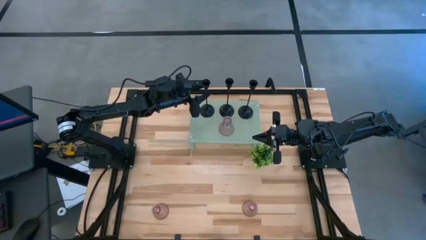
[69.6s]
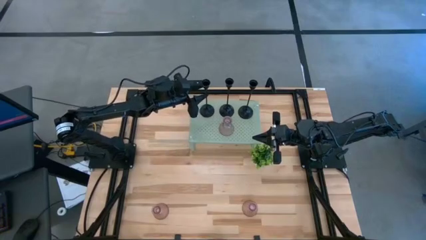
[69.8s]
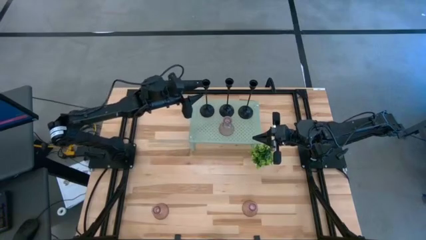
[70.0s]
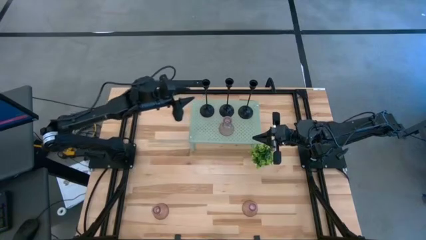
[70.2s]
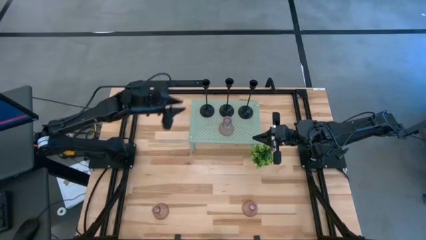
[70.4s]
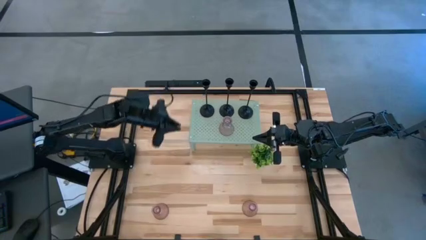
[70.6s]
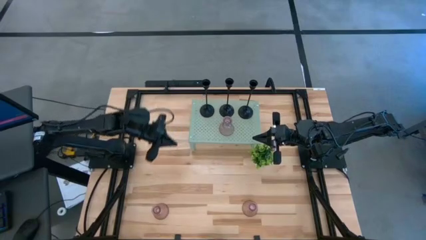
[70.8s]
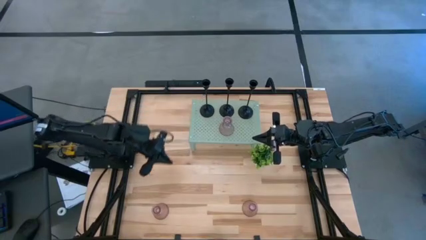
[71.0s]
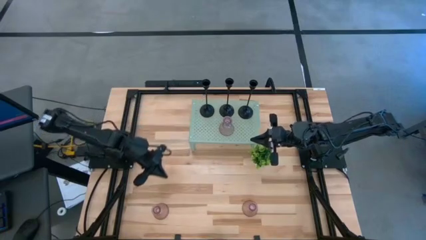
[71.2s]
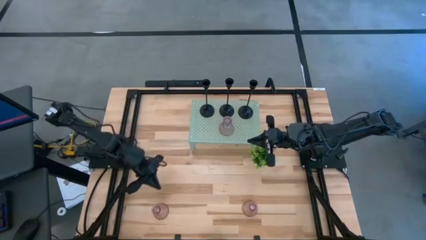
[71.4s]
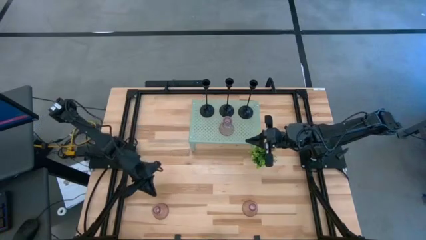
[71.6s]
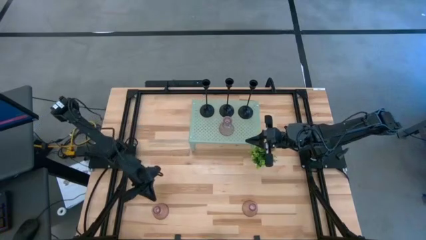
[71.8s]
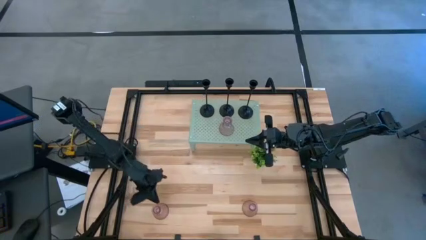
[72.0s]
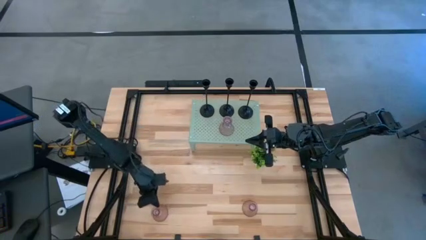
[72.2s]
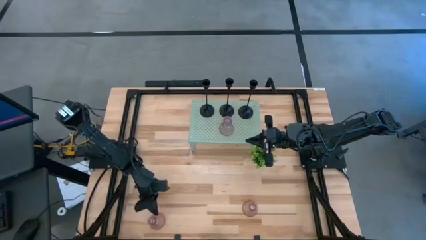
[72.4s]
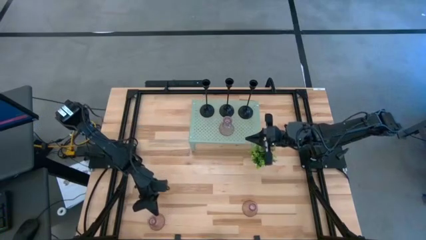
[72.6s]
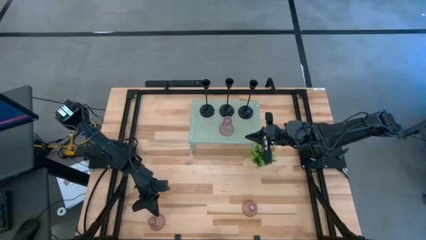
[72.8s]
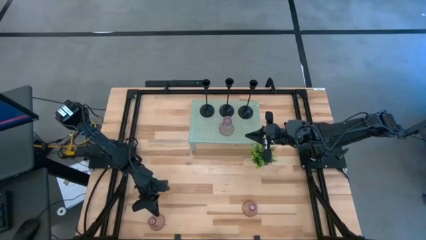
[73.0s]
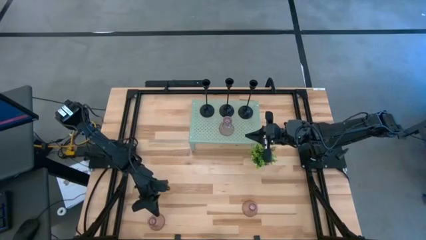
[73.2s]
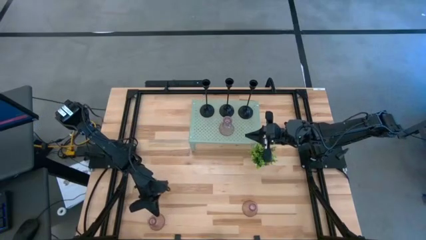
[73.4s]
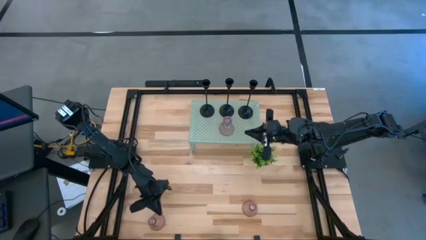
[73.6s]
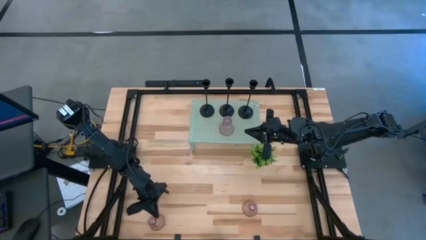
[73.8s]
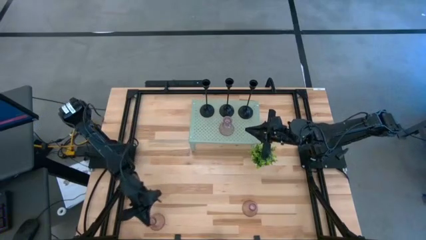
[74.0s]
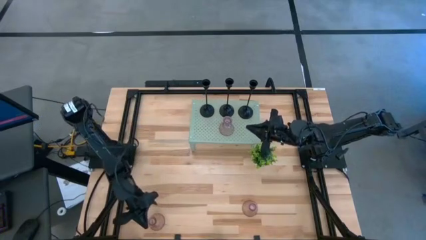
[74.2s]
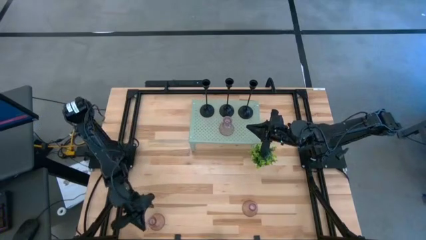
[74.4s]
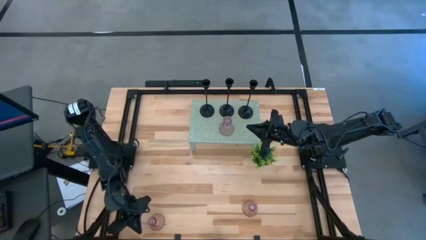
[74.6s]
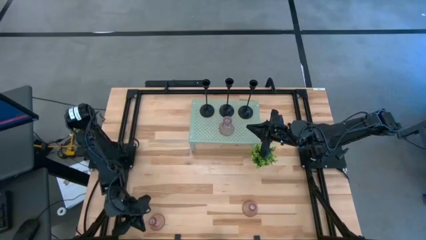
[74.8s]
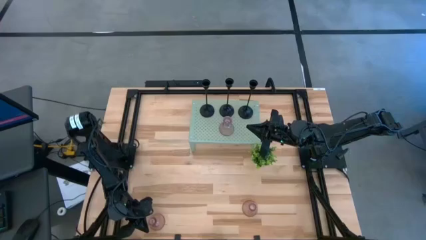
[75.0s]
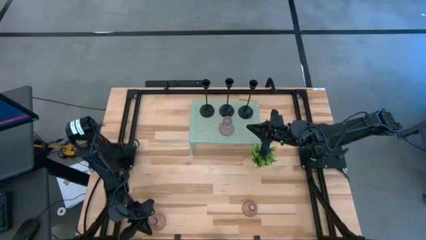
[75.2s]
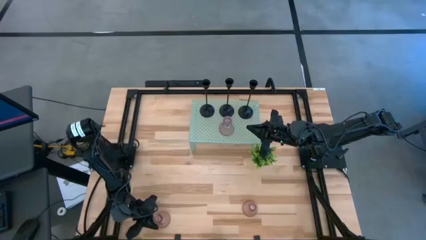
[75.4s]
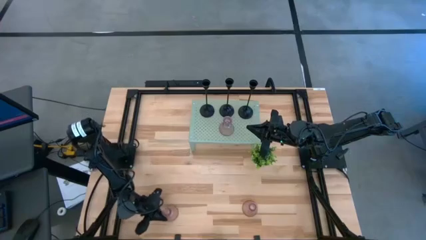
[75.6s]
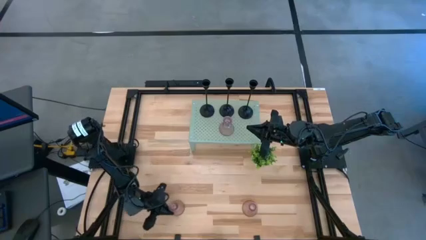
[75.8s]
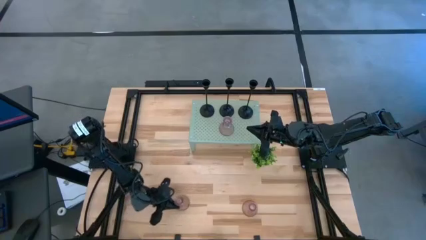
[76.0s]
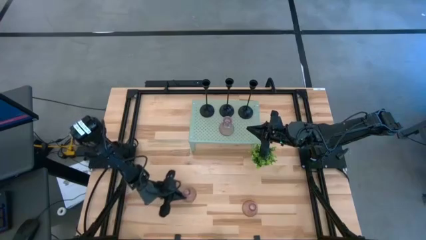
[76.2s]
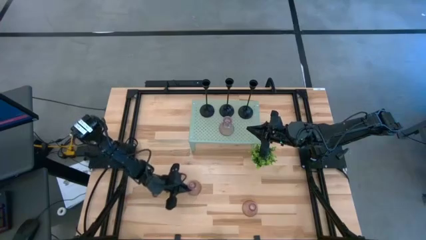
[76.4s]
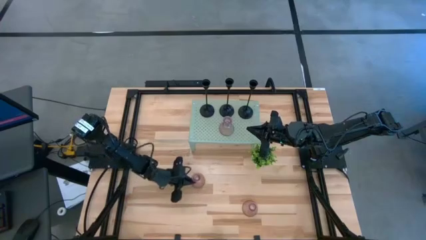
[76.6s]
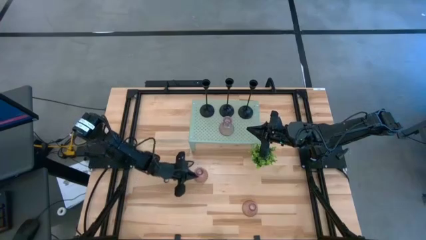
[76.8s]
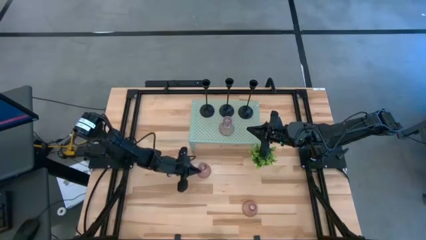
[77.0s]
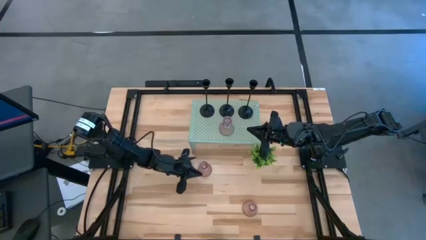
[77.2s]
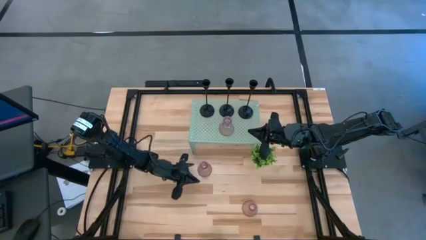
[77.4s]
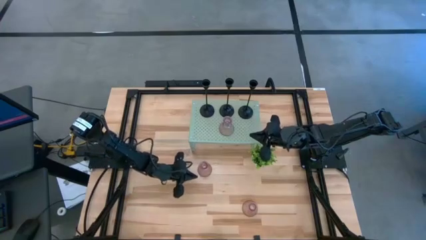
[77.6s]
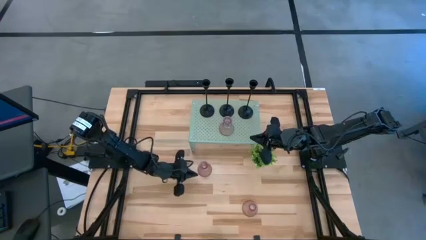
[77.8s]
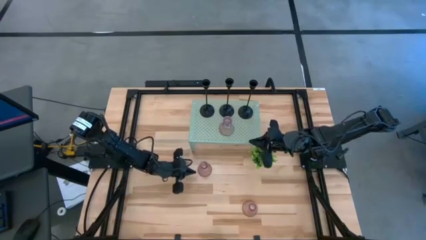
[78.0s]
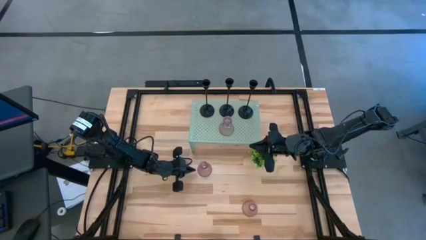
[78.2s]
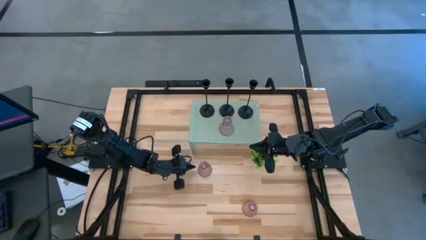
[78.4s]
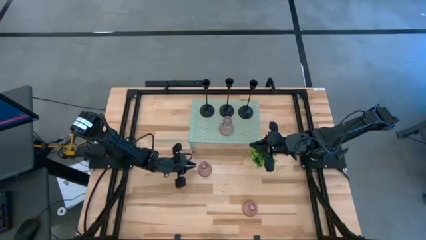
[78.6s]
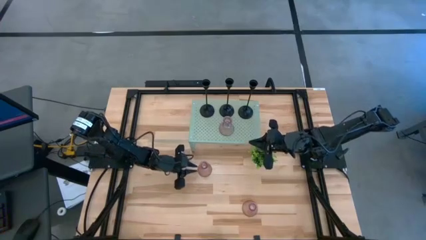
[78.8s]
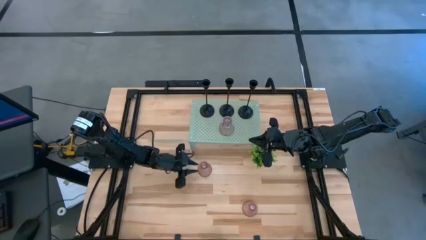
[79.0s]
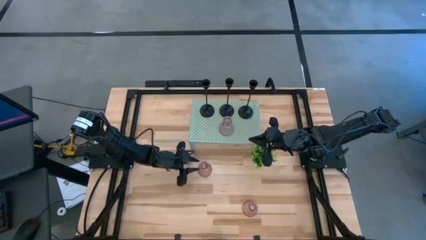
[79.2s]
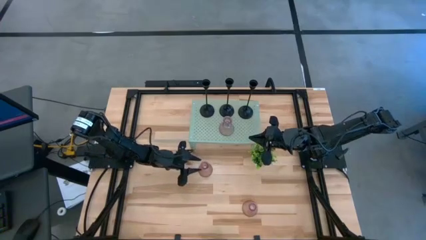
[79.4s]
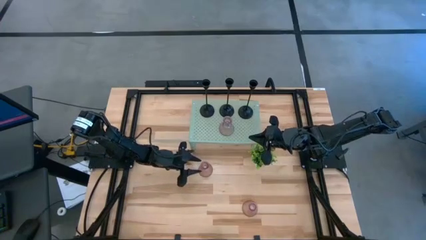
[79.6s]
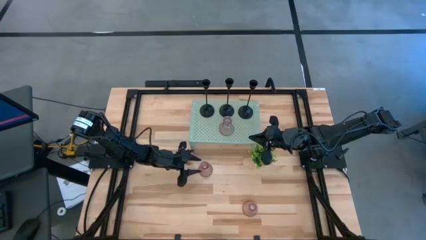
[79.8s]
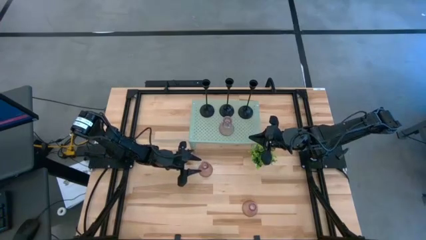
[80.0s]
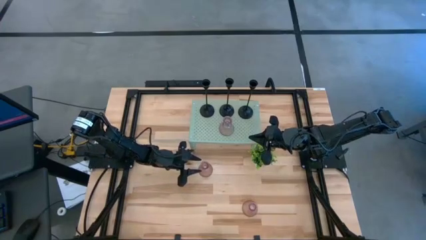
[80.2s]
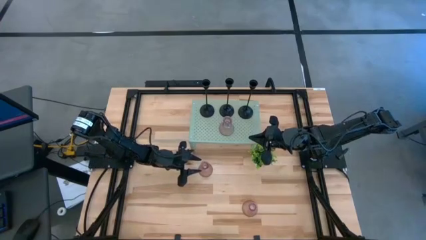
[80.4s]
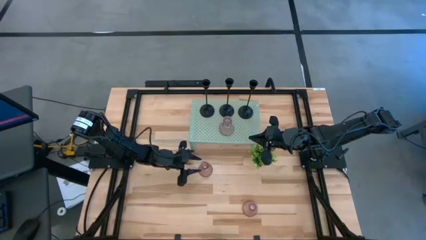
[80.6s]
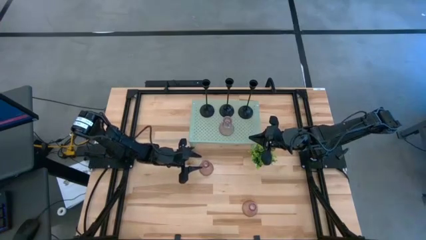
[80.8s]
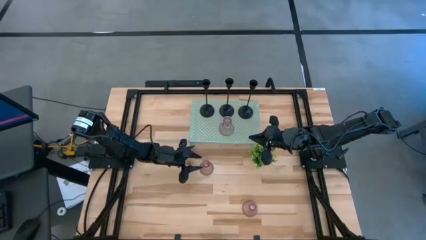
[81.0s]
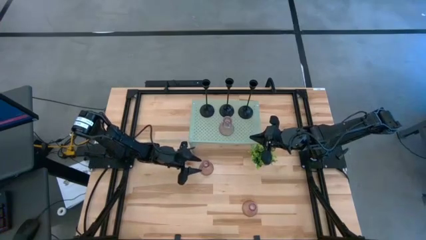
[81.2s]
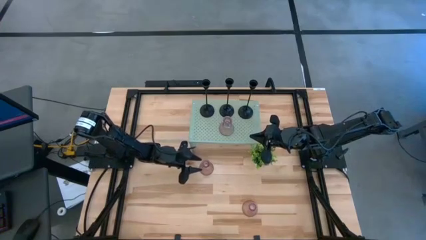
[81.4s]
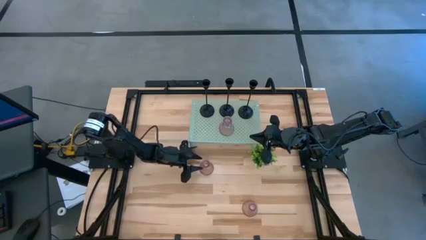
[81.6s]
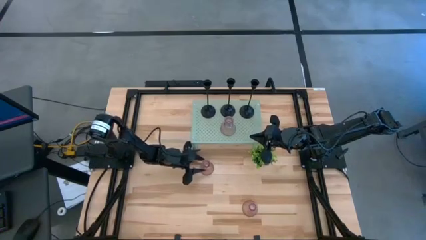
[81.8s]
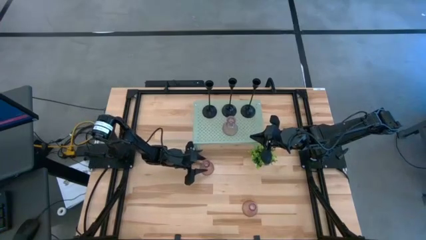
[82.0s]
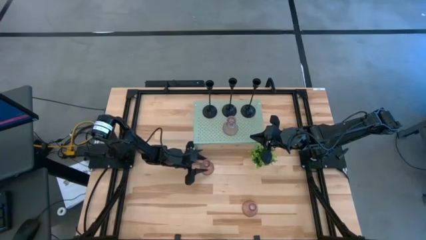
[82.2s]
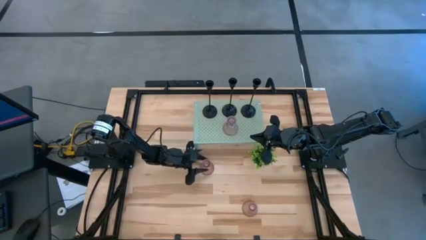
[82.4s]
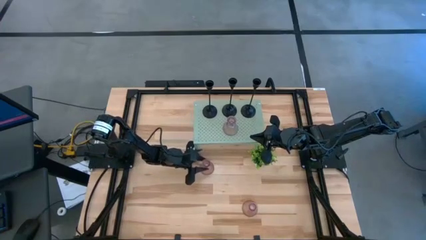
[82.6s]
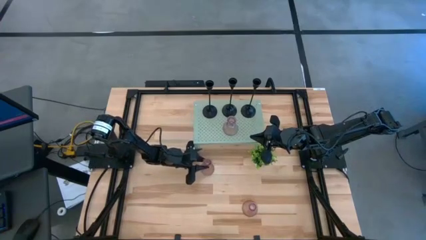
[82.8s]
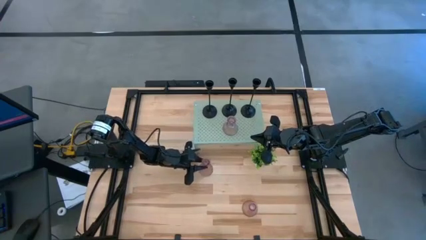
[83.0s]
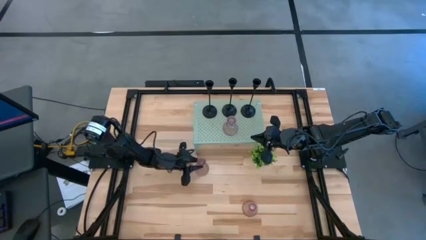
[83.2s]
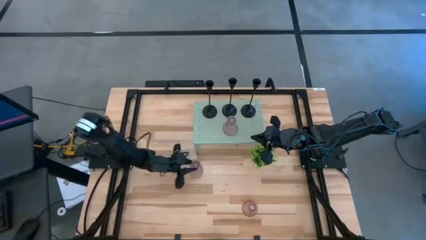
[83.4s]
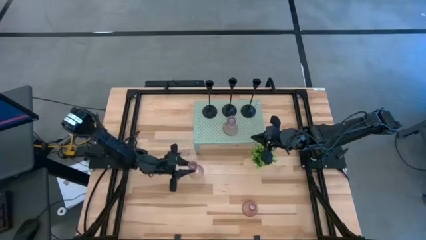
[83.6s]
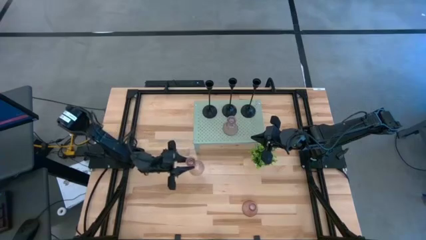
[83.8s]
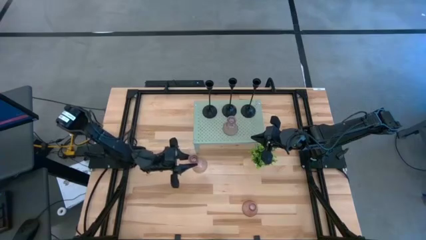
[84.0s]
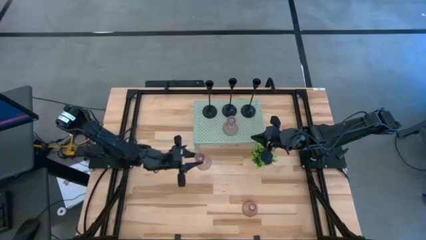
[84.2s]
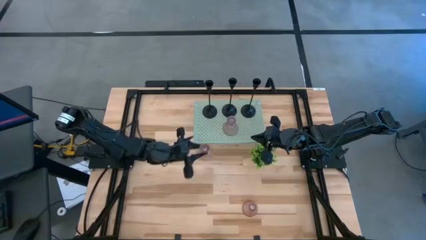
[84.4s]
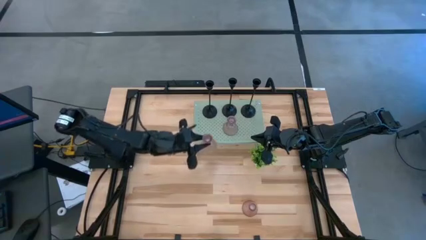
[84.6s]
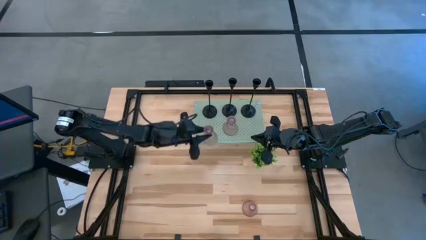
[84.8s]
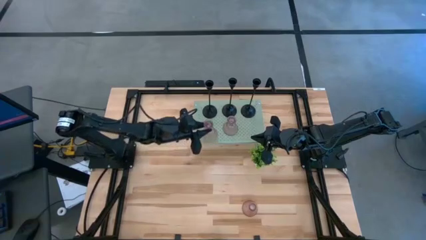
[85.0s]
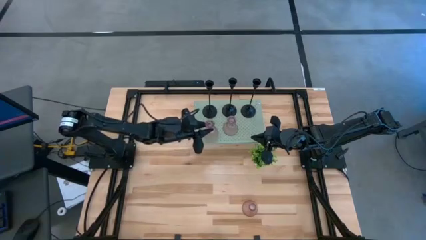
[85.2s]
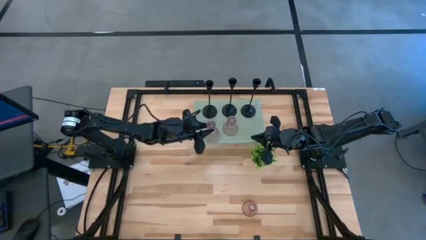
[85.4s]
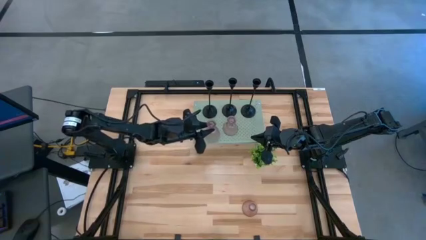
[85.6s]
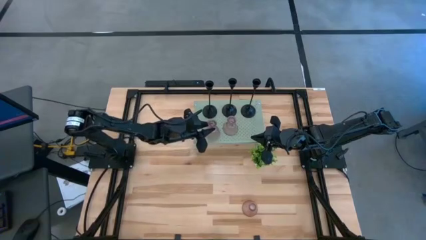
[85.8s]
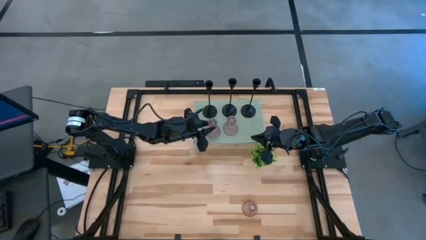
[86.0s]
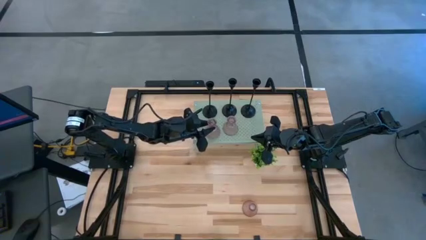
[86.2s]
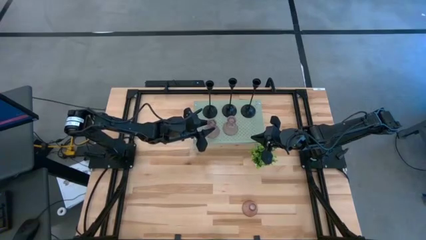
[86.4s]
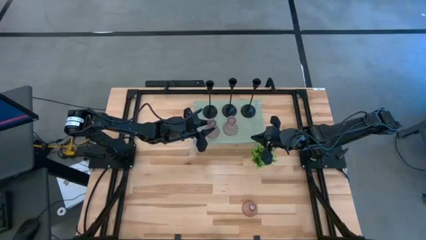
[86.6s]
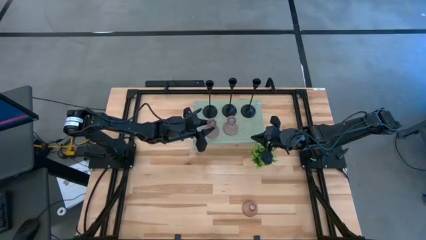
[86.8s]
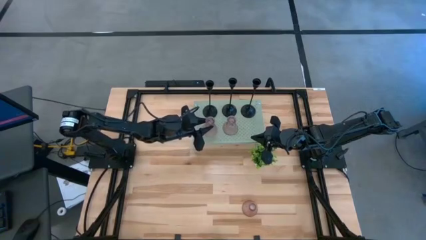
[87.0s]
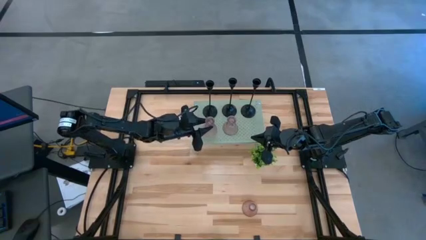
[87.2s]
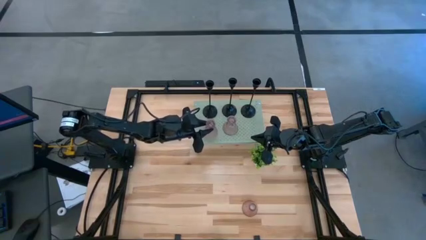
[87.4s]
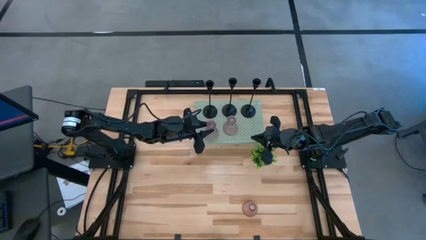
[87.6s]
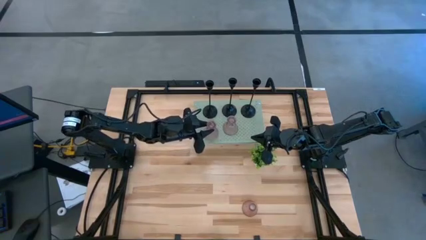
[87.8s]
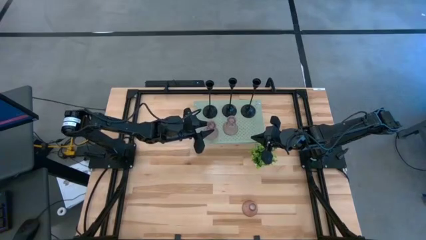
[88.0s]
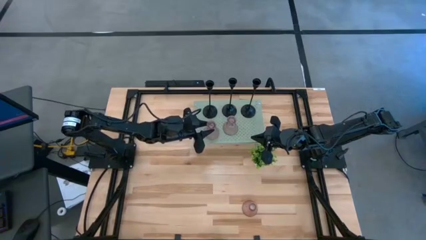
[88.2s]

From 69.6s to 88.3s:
Task: Pick & Place candle stick holders
Align the left pink candle holder on the shelf with the pink candle holder
